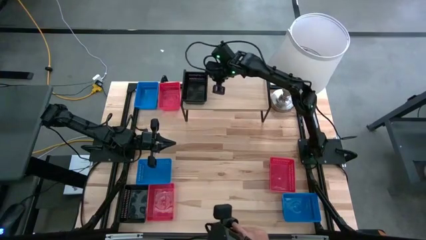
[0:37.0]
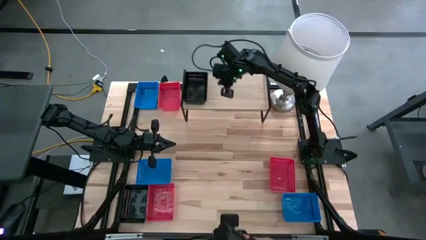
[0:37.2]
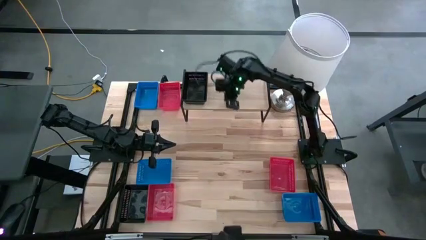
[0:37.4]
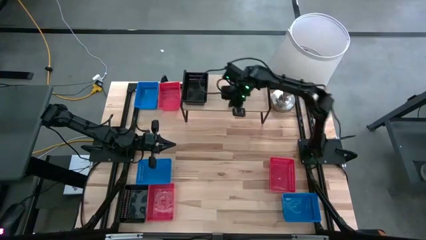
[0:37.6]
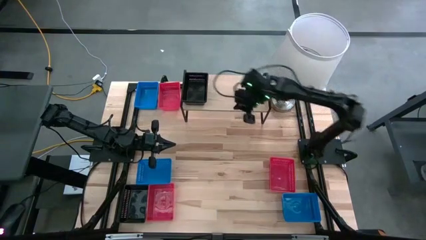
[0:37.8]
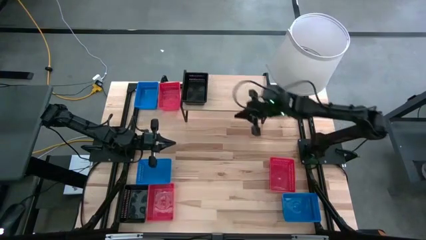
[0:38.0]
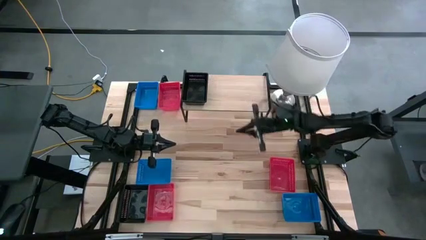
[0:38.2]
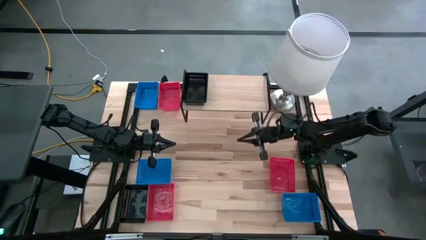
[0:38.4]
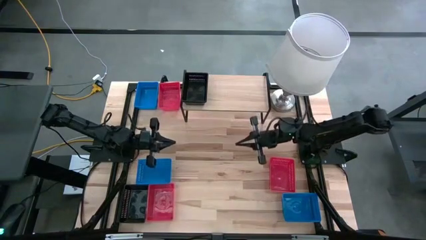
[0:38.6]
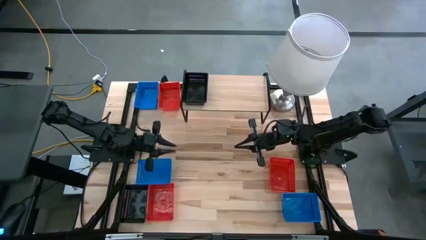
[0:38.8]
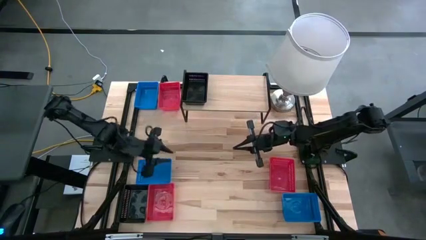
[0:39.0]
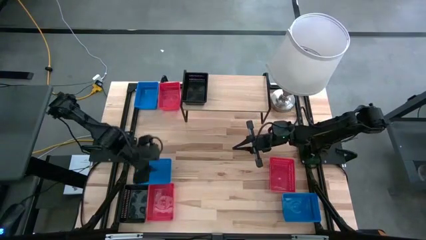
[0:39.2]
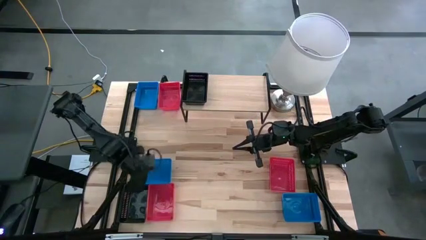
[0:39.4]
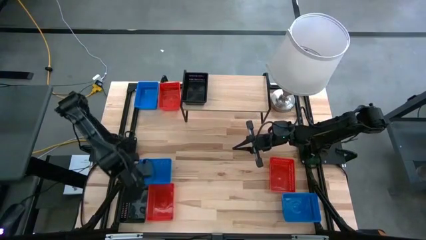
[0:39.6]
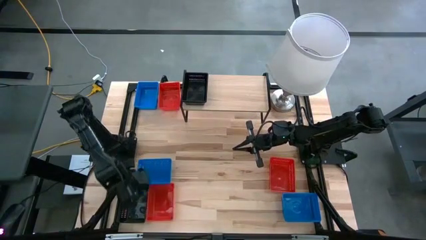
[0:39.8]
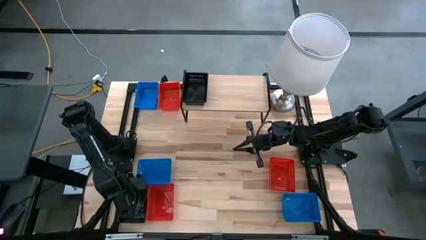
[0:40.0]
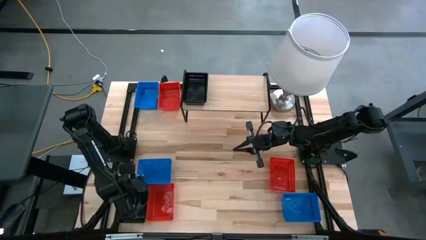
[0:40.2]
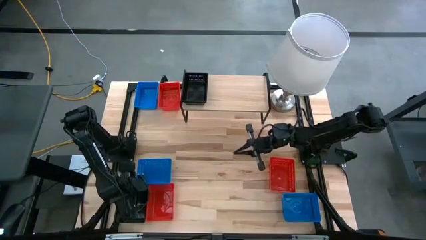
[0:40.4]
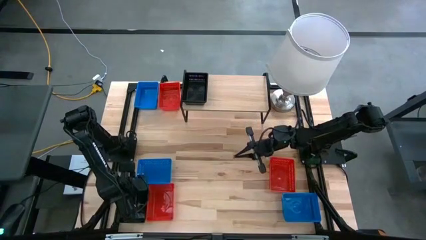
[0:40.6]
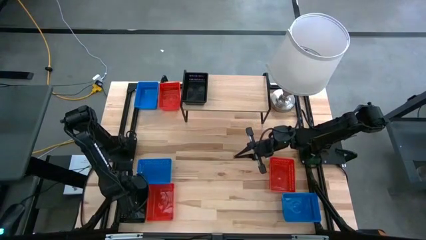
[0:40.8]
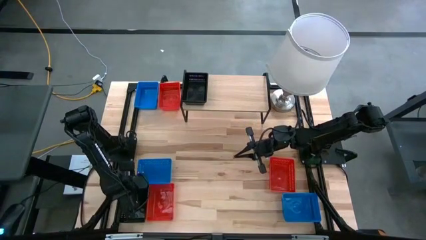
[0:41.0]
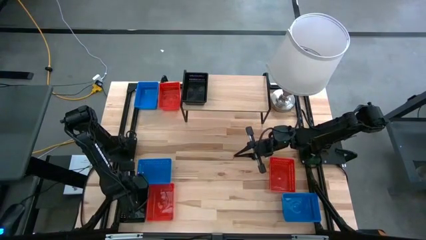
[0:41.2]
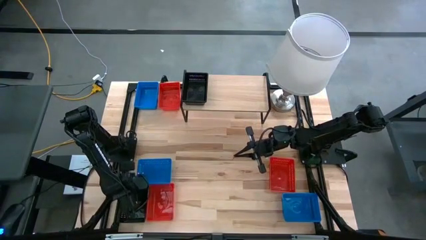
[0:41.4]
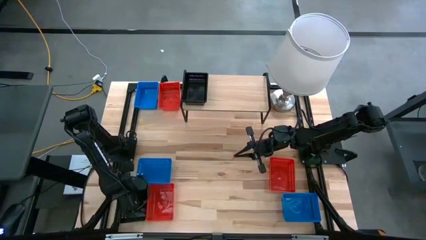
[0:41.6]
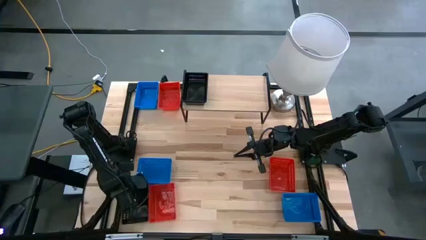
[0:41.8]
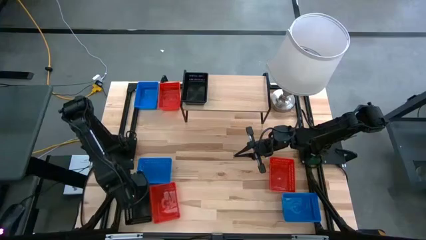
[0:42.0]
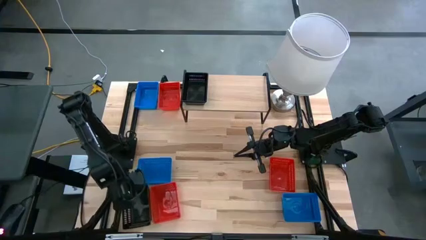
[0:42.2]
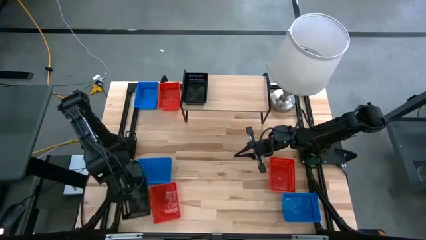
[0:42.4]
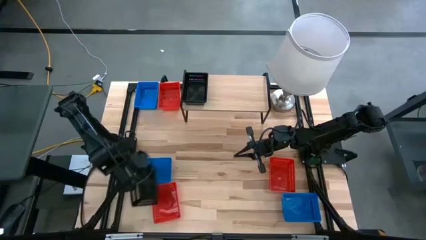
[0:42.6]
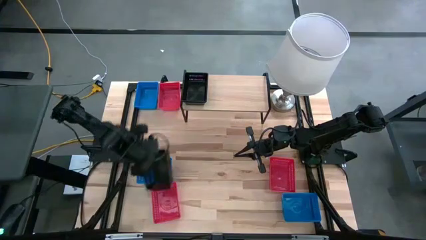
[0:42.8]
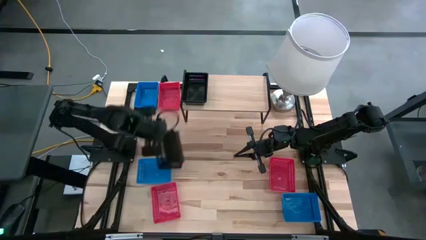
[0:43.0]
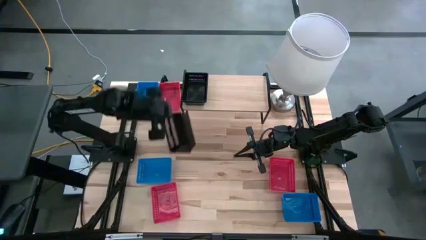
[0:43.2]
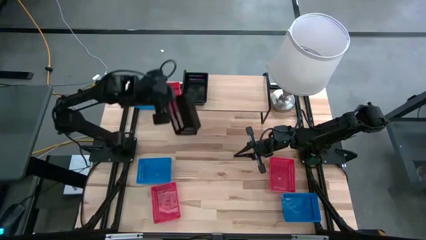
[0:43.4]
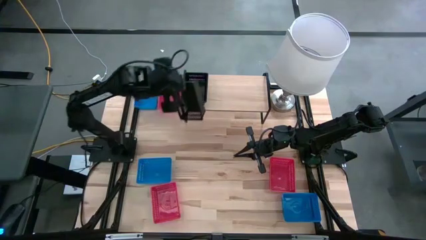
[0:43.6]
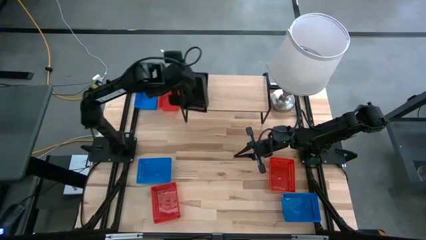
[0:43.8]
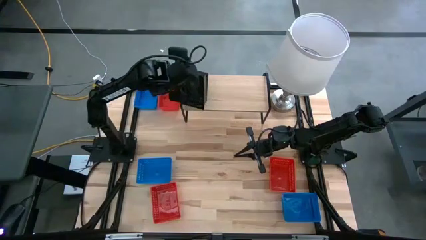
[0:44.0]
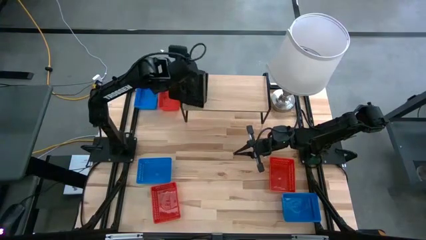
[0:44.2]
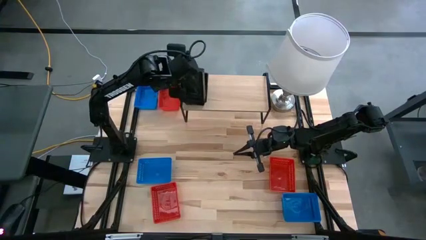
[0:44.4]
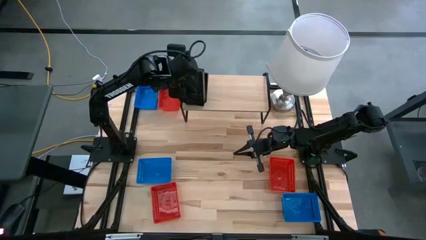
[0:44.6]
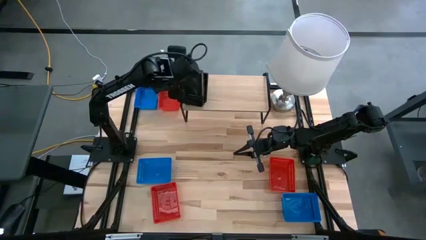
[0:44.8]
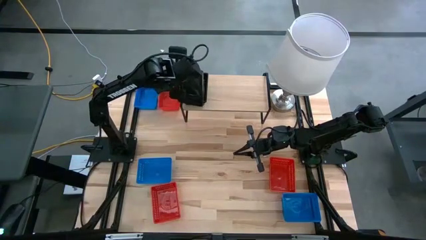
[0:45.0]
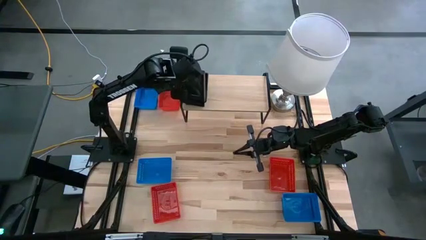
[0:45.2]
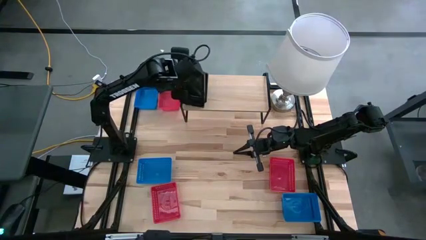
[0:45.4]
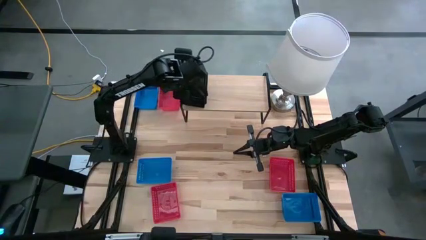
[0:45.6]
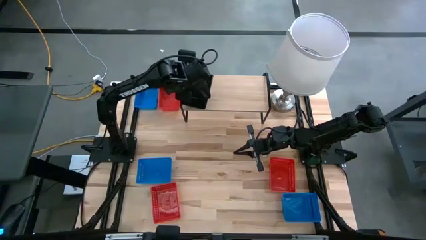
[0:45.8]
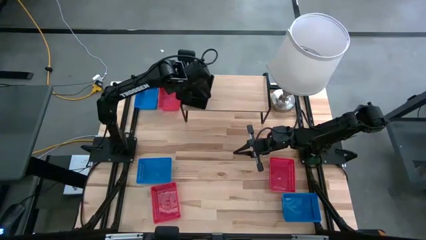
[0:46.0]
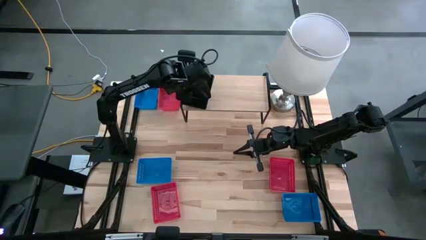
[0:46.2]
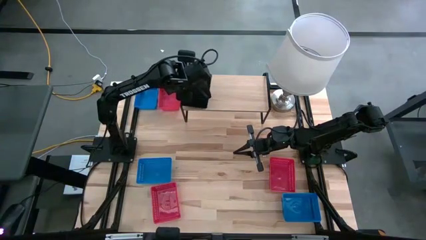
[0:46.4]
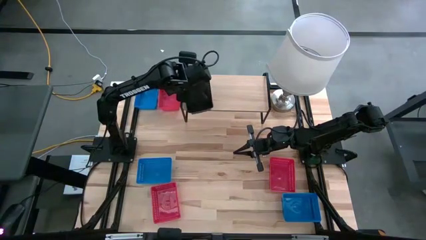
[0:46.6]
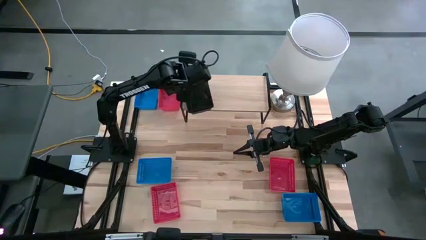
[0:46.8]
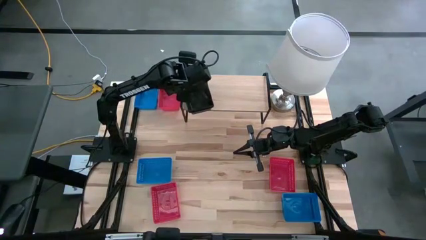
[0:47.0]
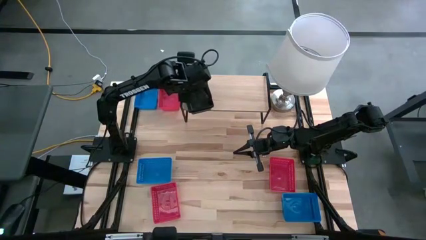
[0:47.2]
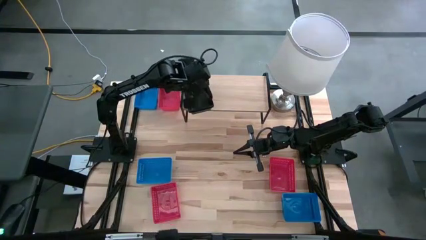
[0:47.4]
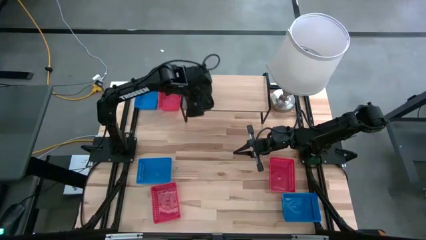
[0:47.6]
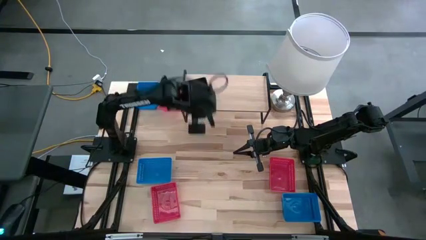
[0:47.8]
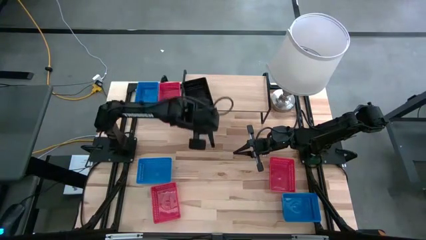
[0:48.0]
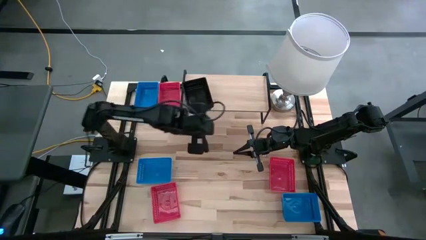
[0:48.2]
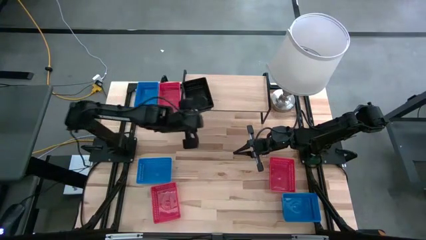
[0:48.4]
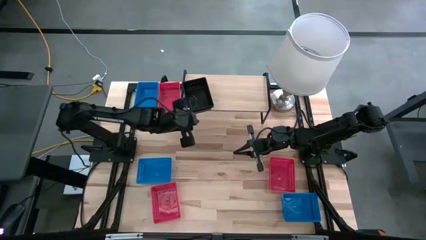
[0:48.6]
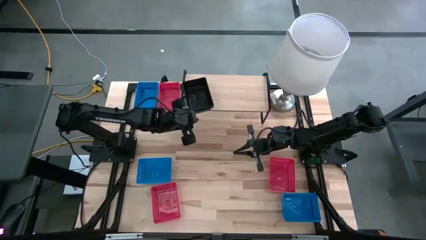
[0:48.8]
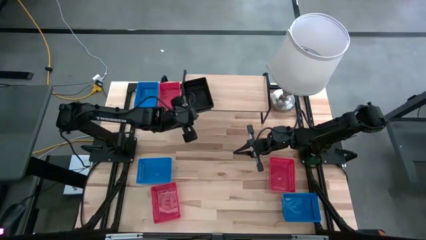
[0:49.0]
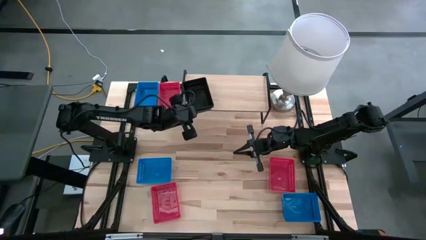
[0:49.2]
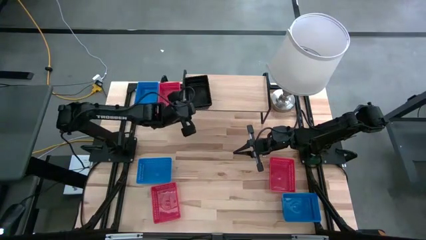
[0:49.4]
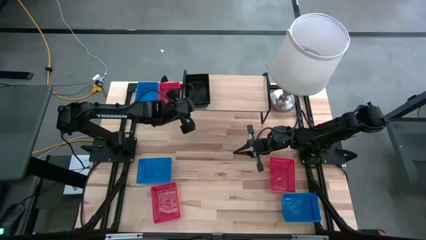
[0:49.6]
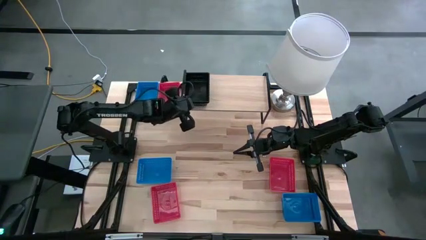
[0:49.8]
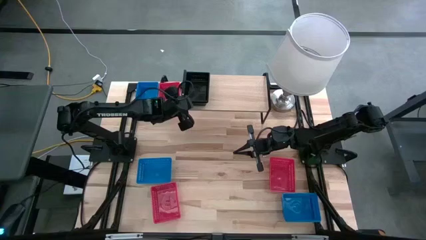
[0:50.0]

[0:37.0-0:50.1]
Task: Stack baskets on shelf by color
Stack the black bin on top of the black bins on the shelf
